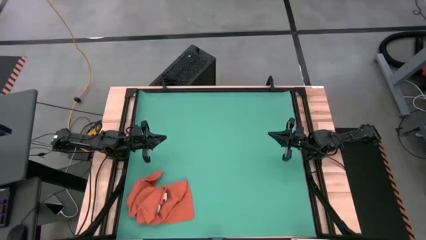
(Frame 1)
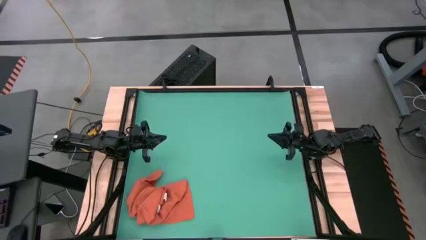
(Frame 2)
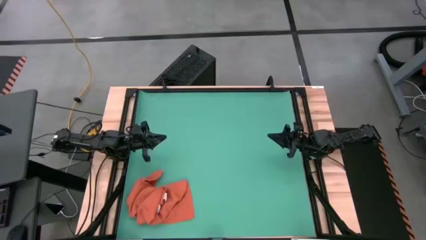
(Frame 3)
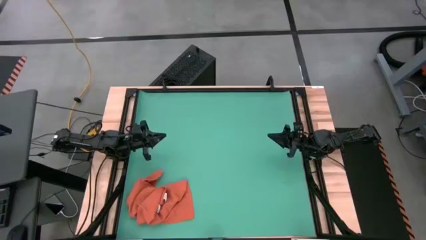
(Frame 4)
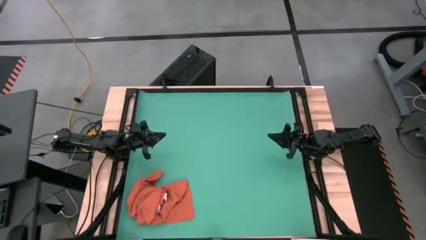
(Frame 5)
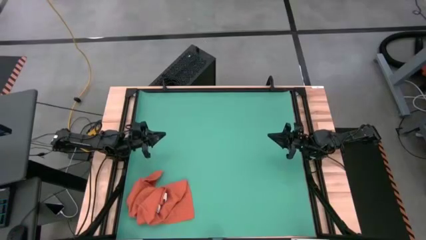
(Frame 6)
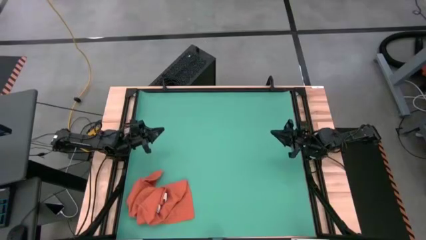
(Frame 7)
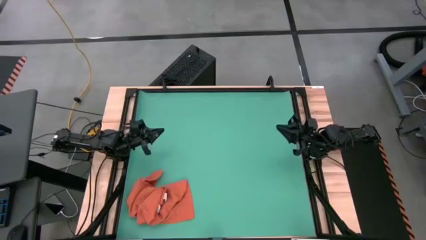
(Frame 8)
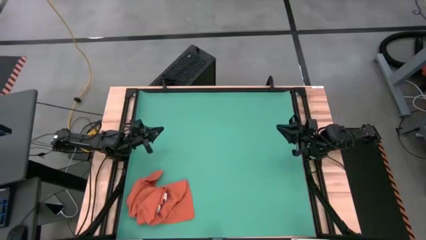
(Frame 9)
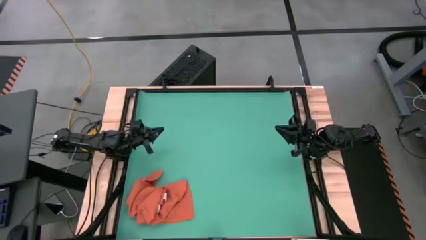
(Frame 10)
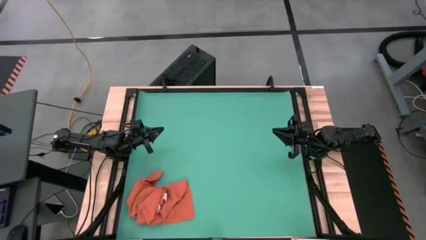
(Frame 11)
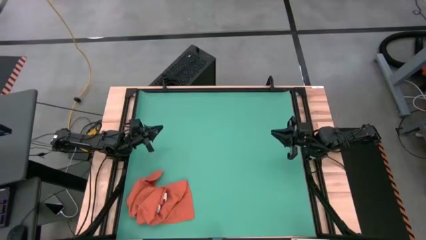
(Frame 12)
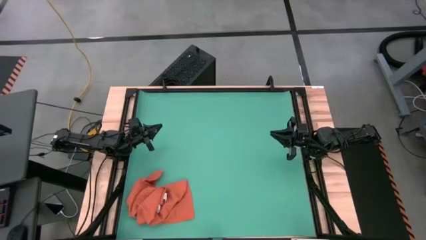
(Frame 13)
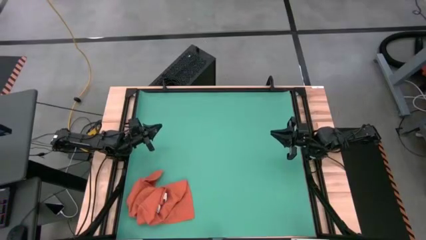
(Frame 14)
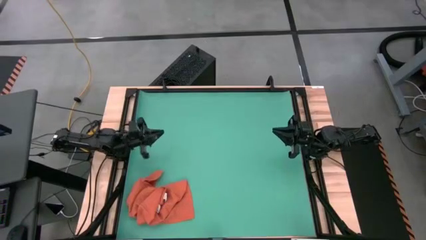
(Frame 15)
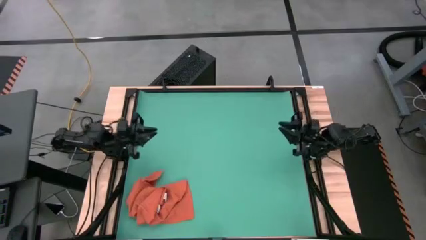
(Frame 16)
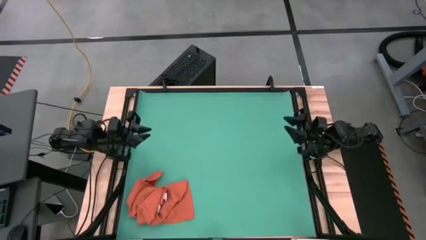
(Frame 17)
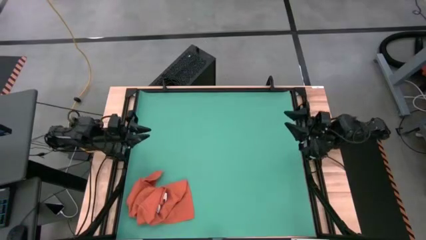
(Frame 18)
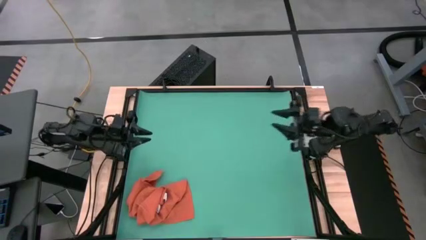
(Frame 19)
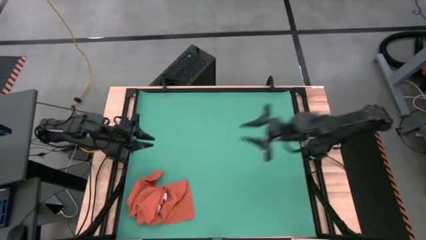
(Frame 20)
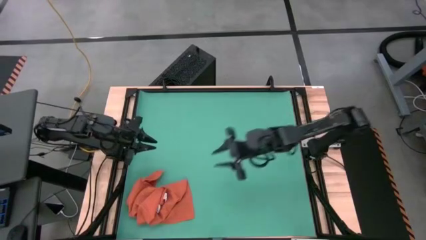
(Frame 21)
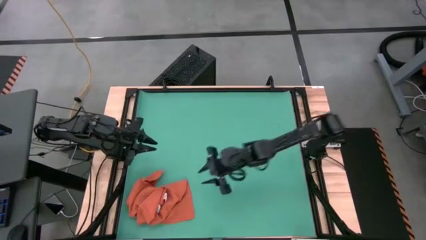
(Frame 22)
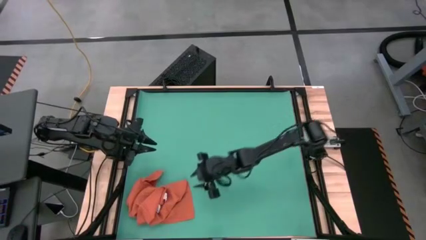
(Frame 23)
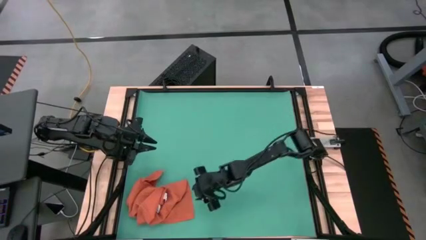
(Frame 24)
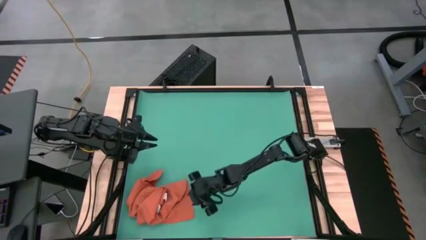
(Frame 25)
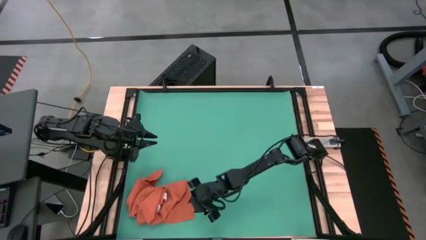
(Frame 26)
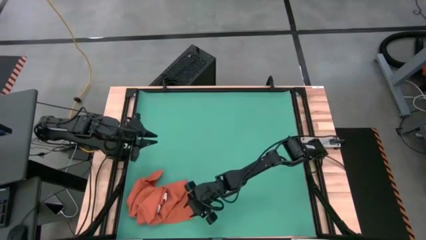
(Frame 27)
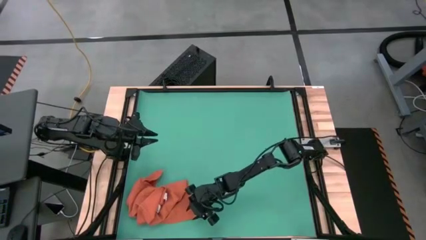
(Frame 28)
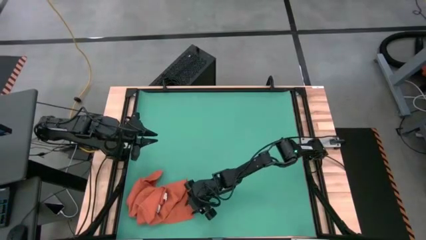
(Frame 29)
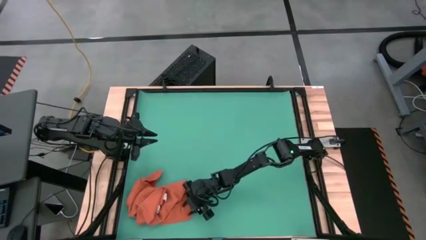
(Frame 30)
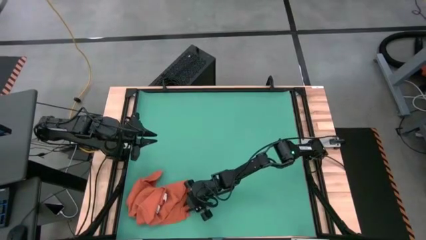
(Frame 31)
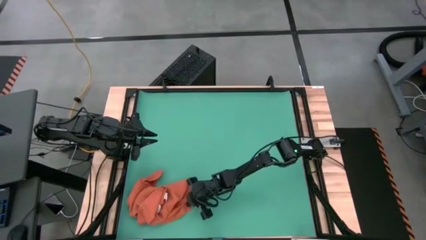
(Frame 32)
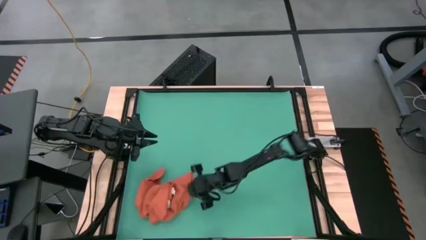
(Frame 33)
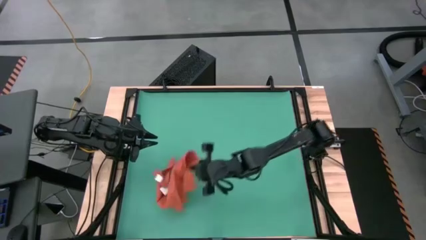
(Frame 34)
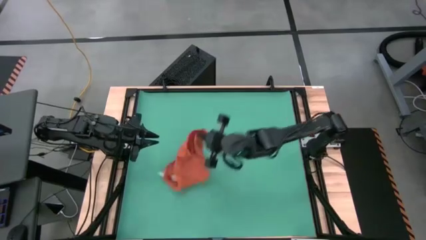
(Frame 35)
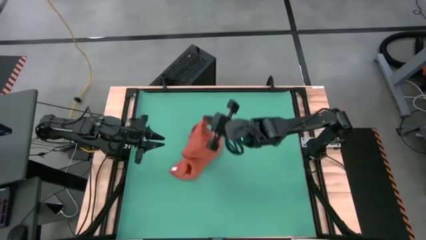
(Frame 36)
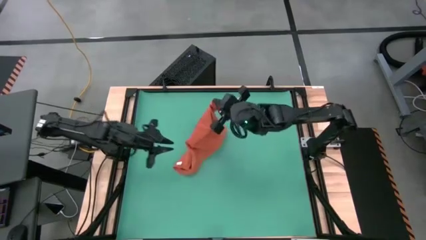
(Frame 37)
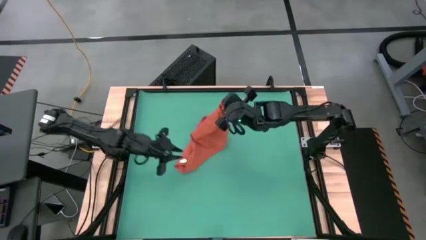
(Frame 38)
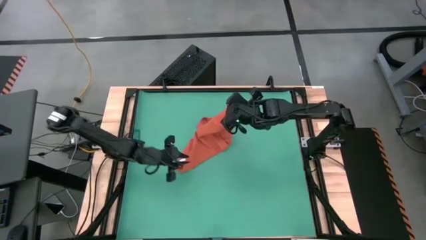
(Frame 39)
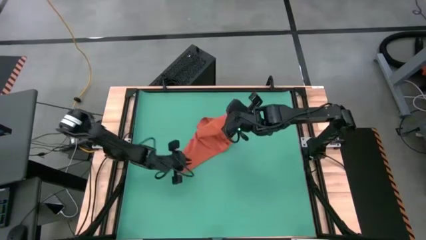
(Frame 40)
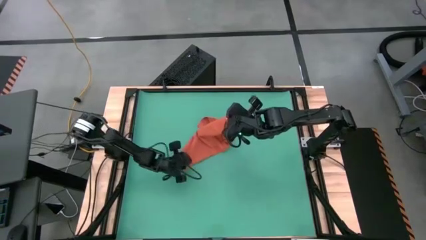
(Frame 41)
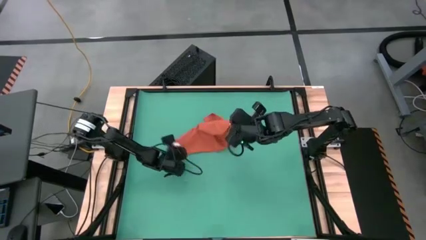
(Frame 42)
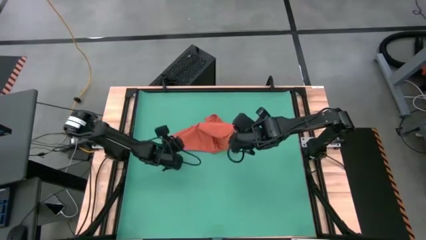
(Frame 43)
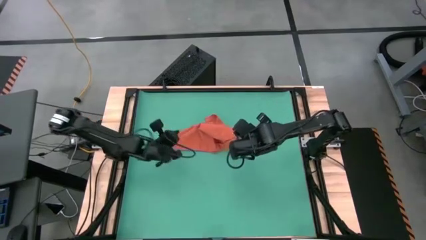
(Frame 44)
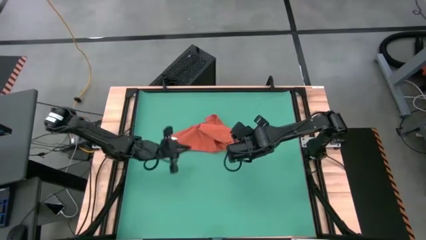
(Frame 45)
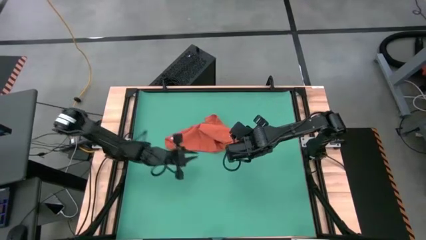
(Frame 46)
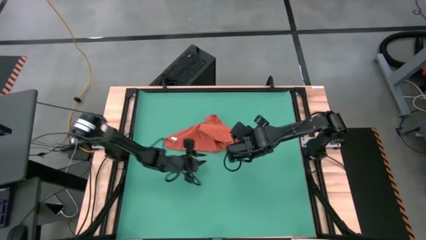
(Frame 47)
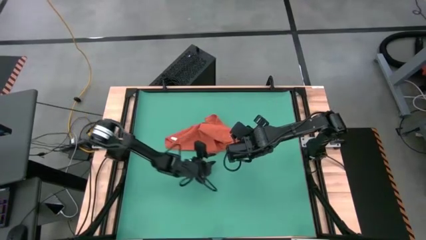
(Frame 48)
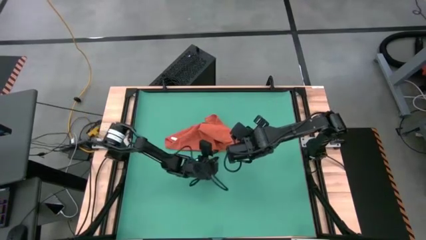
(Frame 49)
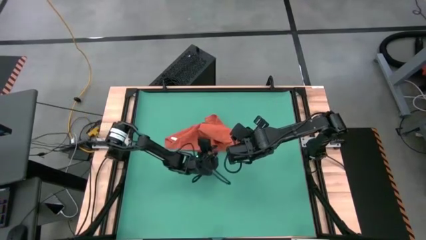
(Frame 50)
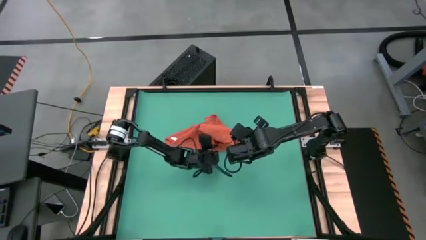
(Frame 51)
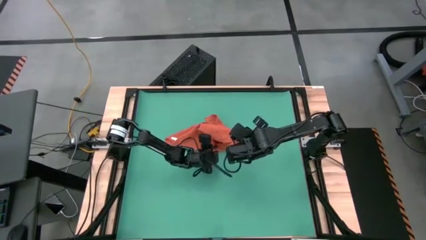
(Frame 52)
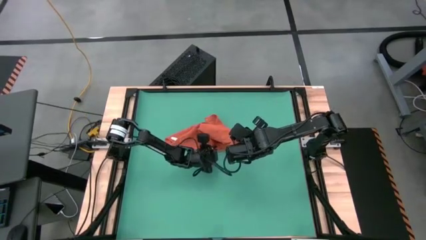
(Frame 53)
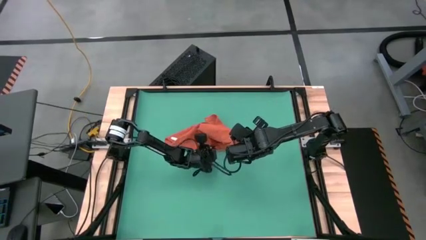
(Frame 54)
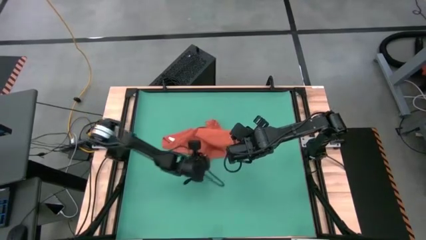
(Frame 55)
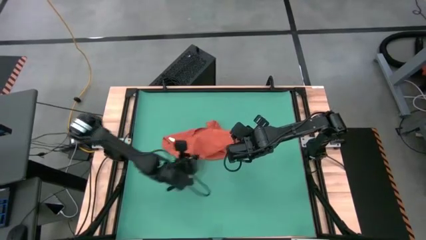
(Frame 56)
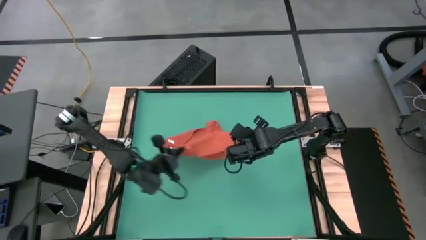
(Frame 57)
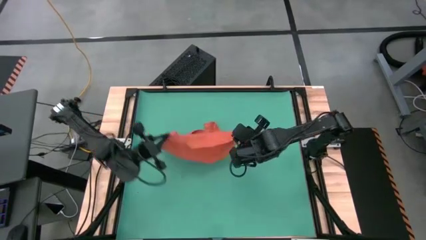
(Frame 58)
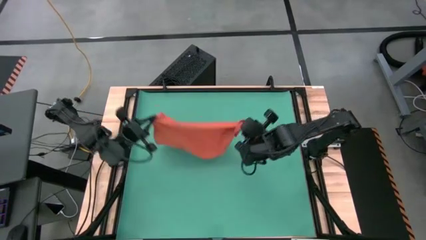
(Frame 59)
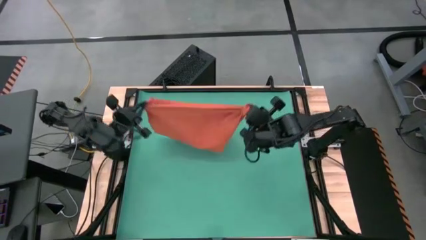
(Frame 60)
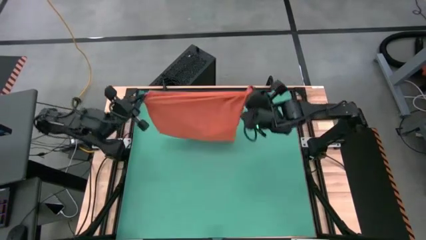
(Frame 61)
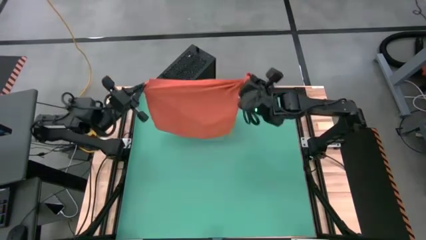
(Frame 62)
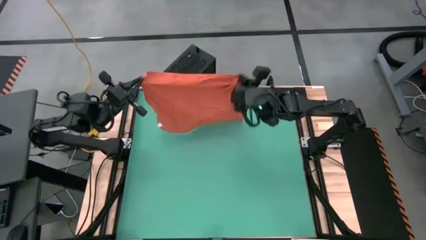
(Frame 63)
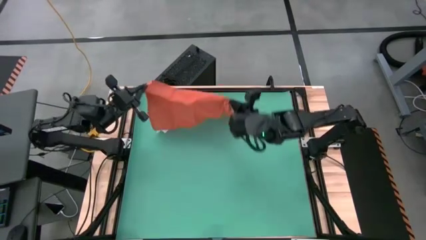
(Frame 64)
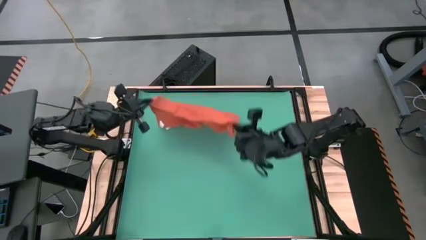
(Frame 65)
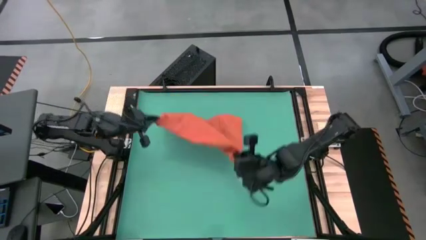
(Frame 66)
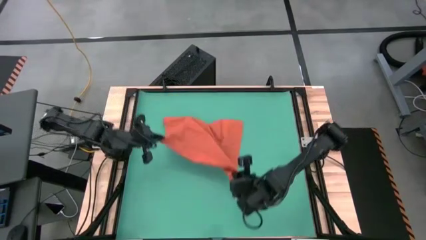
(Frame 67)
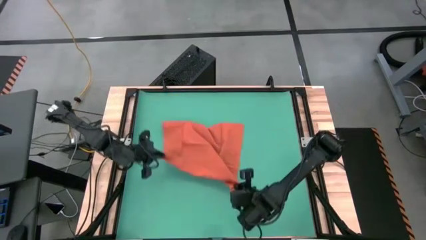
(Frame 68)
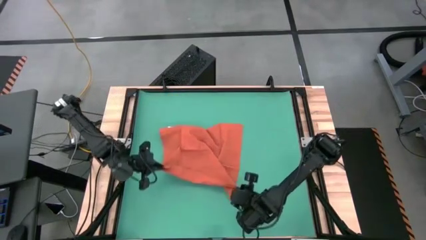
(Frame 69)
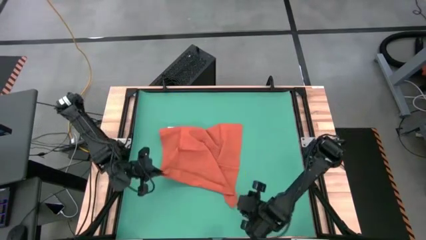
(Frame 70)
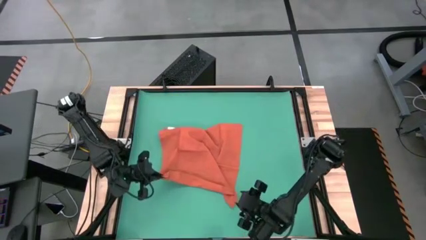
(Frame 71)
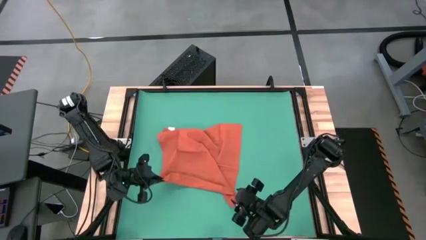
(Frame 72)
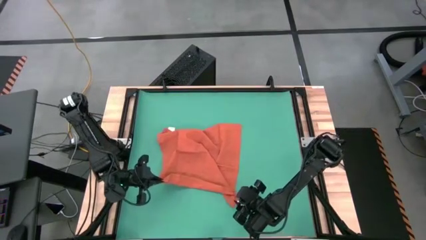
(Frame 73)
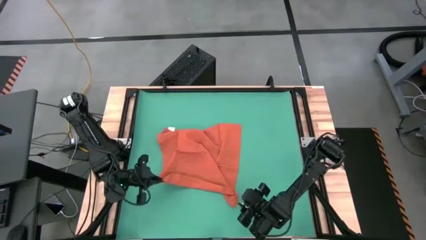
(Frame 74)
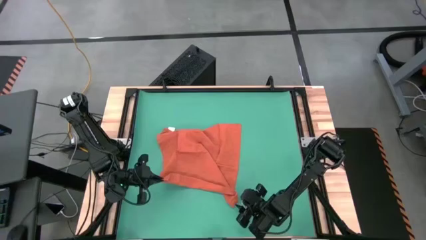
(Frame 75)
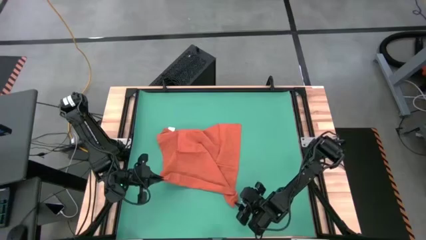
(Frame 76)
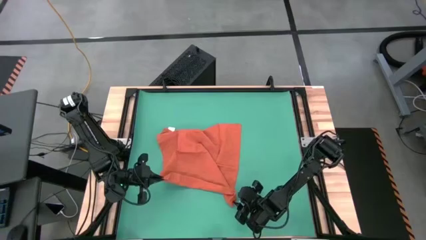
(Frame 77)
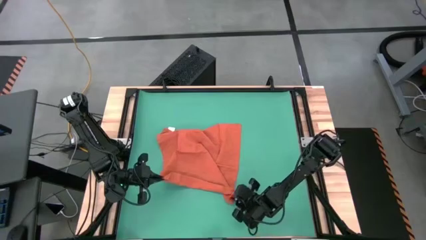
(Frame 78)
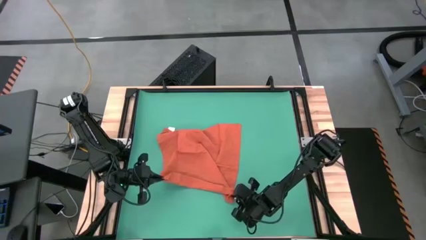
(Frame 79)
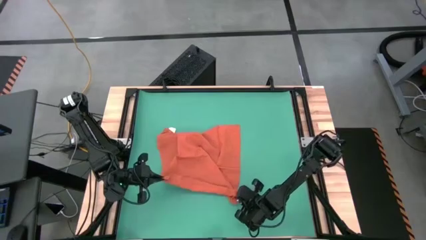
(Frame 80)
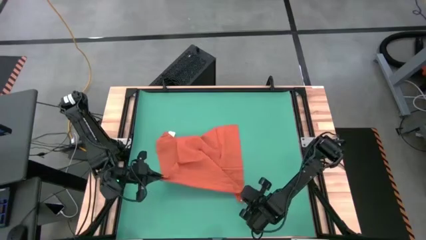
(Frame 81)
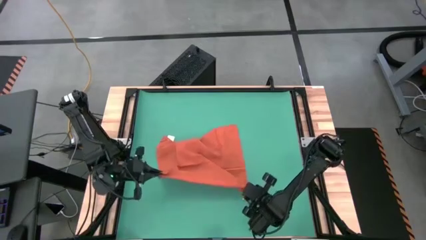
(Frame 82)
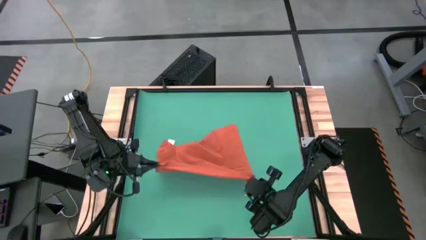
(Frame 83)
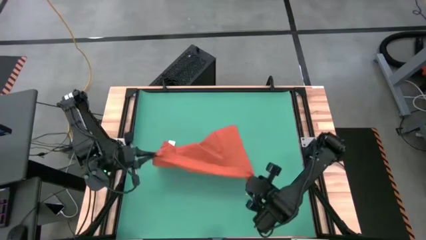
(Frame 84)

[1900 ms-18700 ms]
Task: Roll napkin
Fold the orange table napkin
